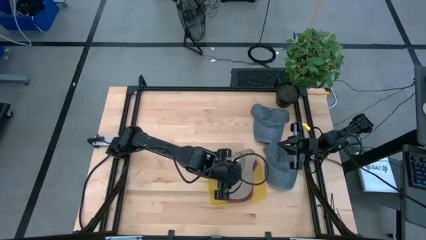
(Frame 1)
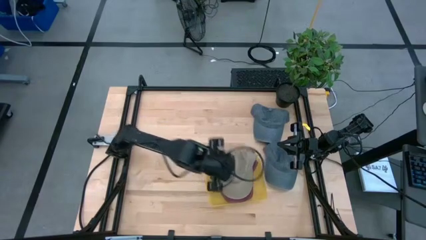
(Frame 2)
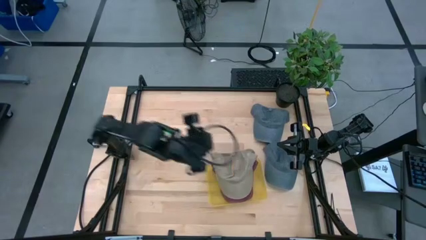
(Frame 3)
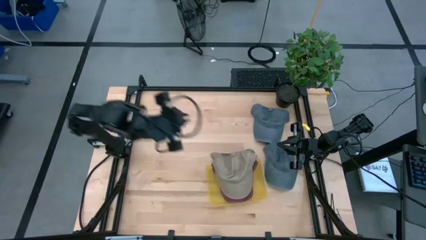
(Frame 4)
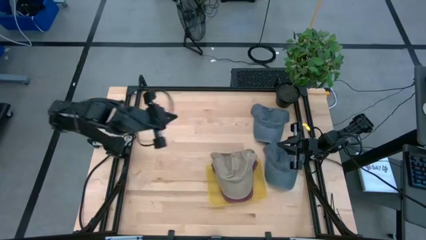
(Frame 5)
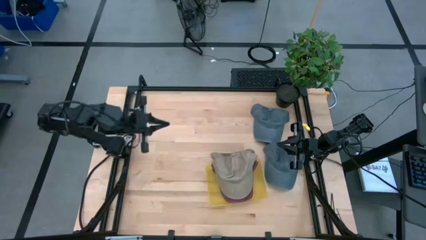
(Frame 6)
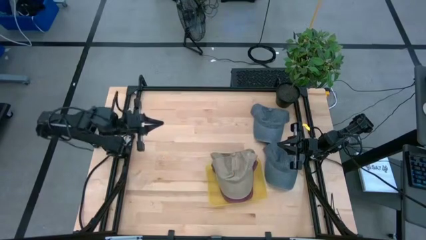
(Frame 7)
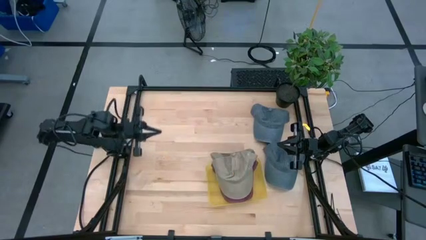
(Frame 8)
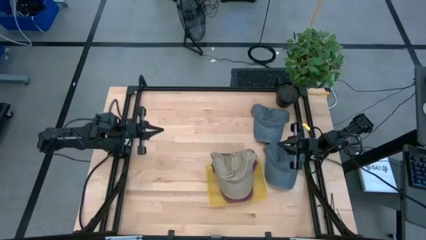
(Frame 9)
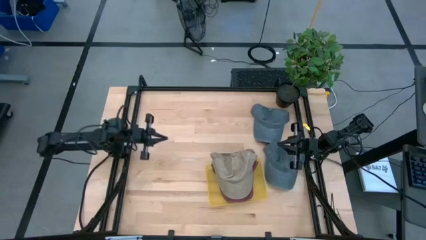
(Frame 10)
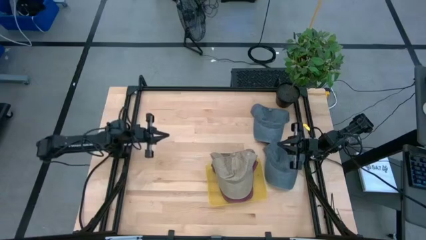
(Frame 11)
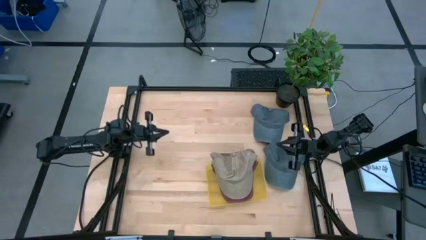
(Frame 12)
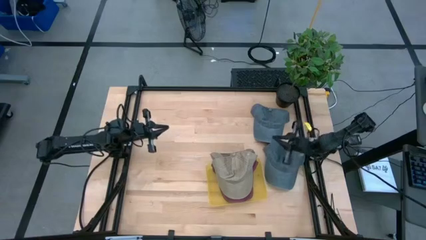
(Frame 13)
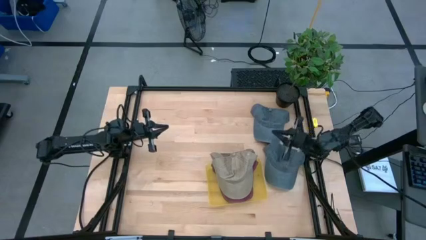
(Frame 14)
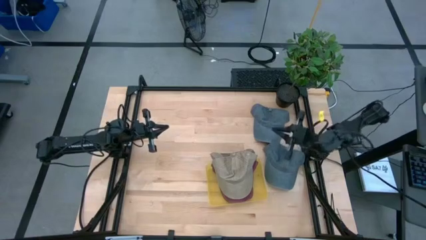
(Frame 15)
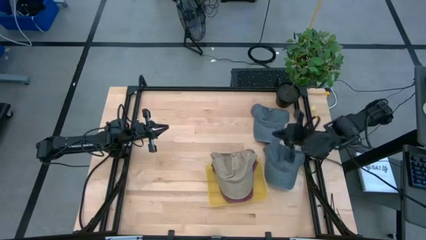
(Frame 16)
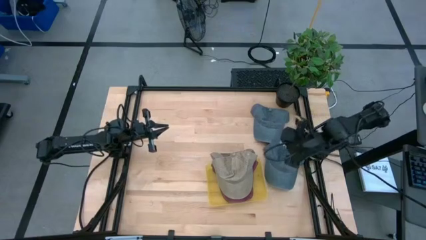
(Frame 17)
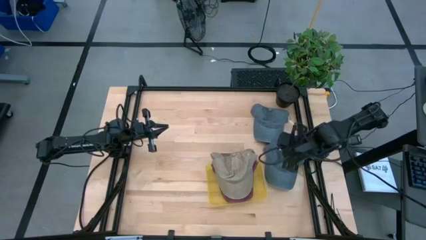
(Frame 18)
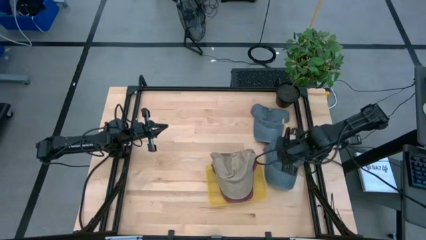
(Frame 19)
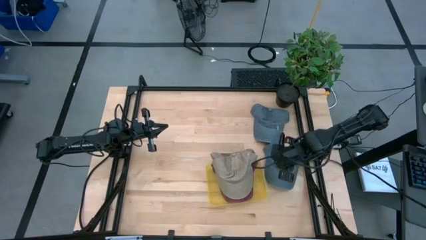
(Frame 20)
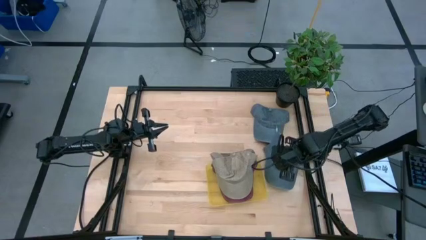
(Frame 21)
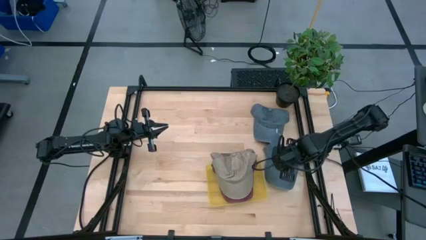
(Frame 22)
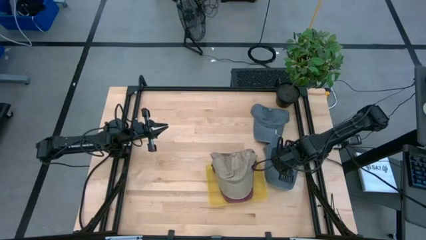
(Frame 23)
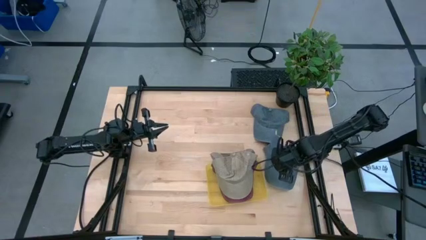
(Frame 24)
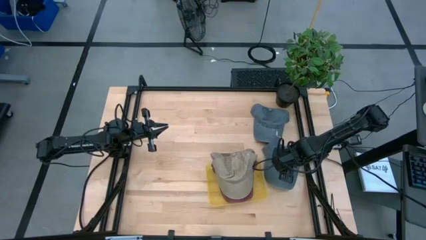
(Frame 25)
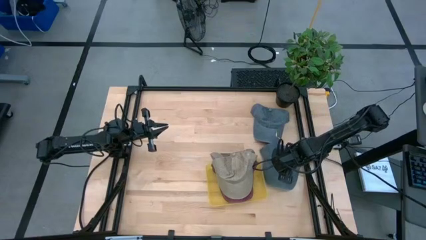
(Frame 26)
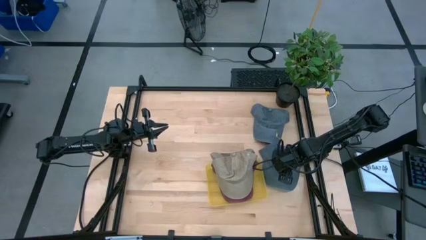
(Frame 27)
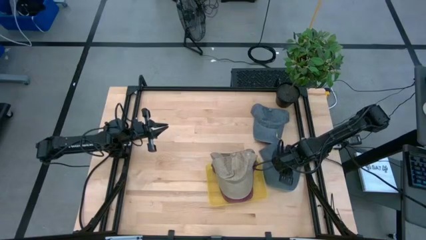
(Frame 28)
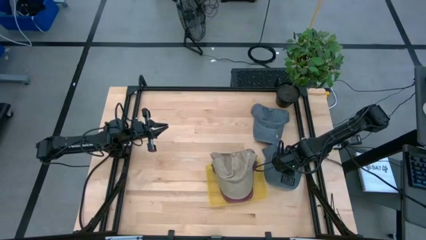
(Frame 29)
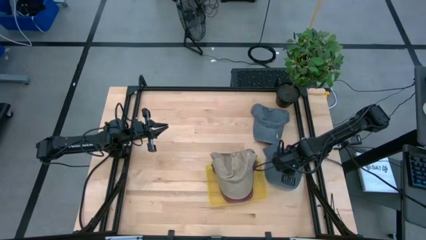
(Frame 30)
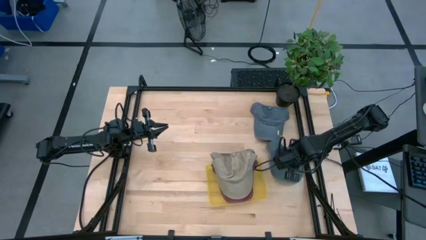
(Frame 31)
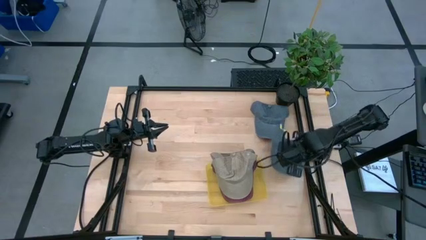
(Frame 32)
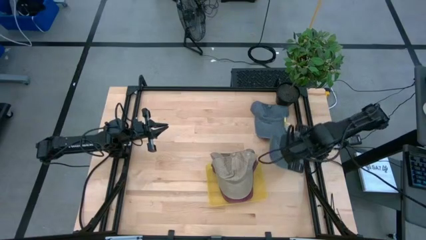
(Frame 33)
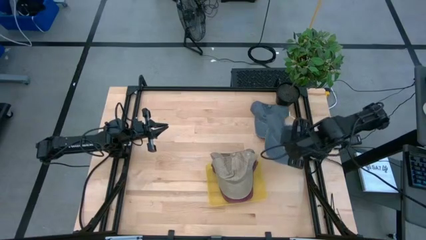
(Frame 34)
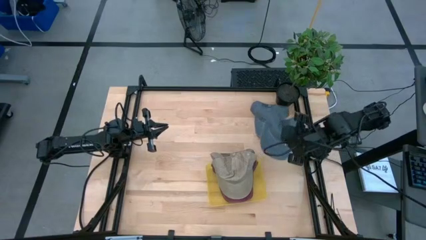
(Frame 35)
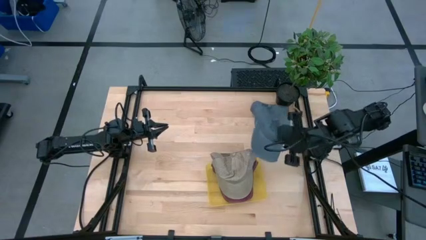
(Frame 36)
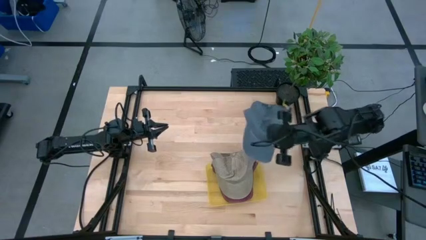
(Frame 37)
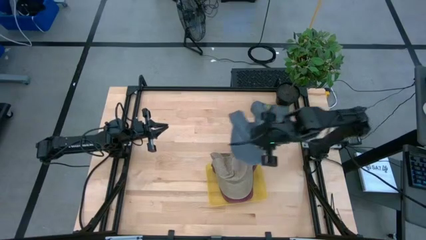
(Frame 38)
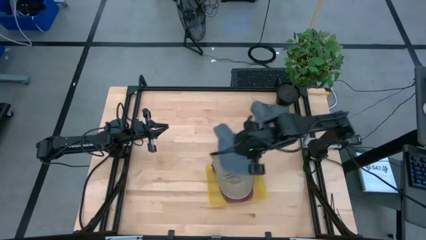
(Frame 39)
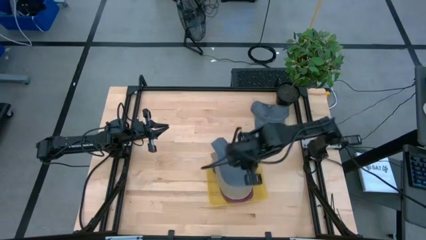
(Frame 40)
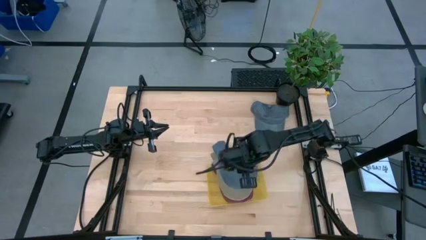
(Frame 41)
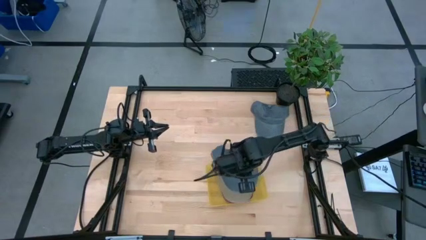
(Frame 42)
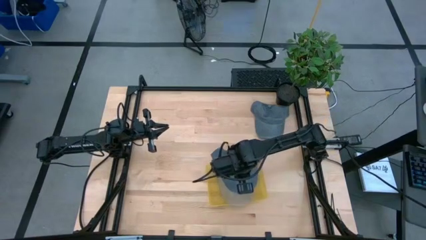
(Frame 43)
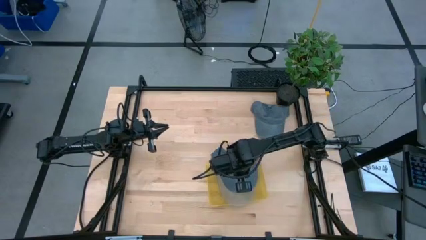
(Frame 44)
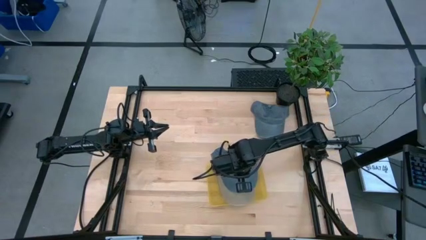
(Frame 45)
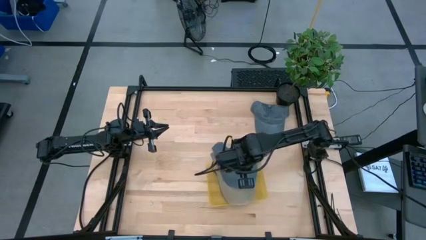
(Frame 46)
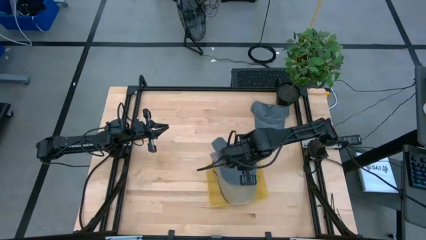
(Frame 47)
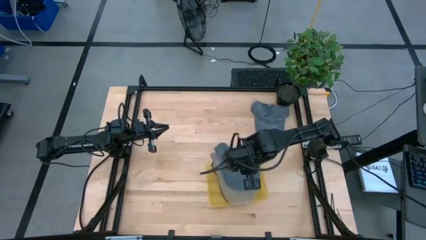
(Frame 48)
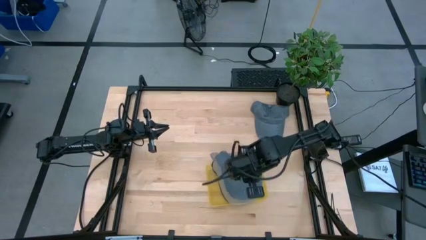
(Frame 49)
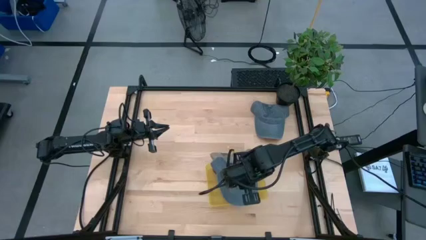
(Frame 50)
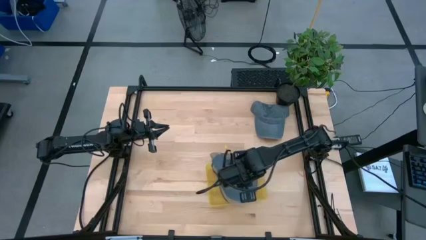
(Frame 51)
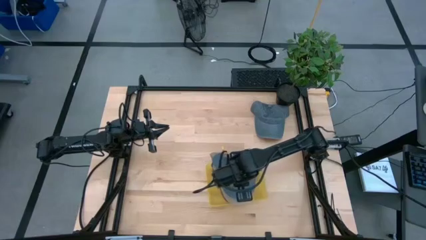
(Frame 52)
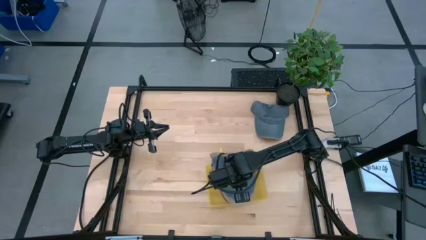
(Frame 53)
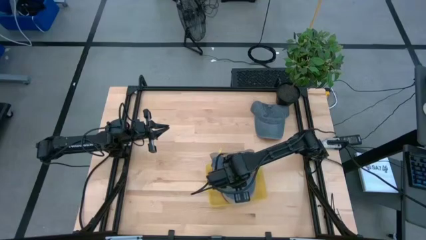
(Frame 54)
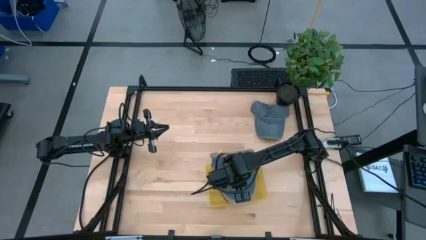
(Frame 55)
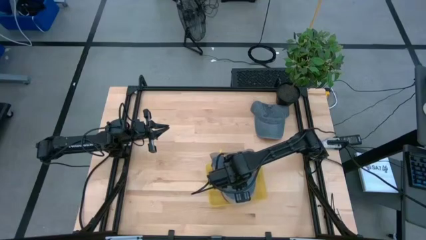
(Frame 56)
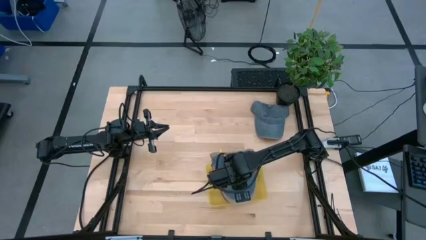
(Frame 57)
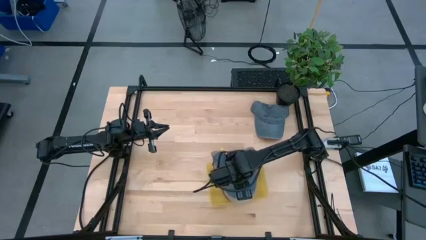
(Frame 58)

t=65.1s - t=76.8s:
Task: Pick and place caps into container
Put the bottom blue cap into the yellow container

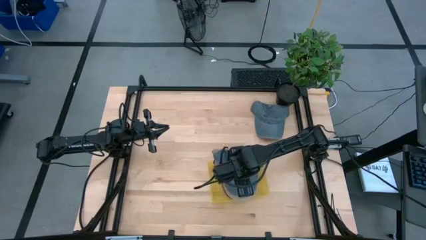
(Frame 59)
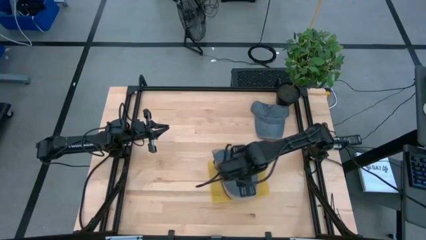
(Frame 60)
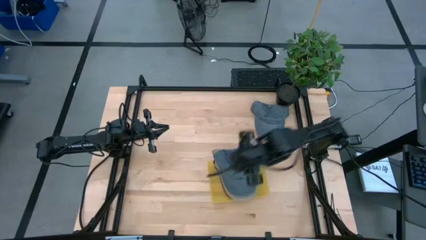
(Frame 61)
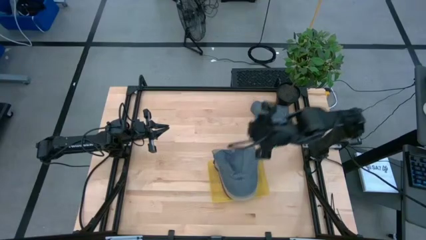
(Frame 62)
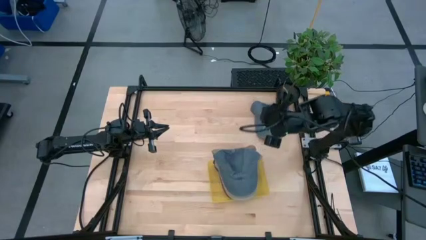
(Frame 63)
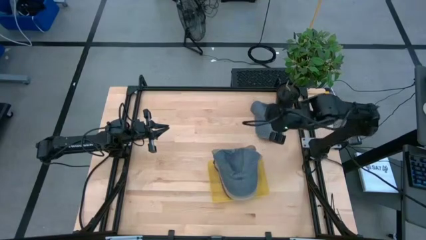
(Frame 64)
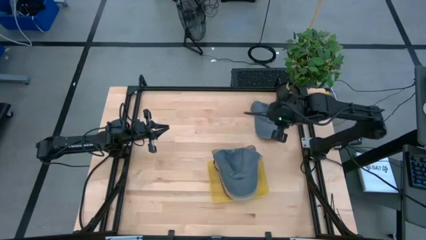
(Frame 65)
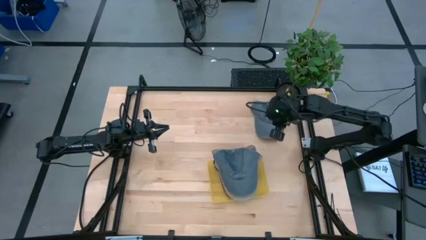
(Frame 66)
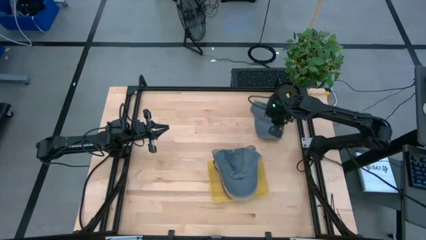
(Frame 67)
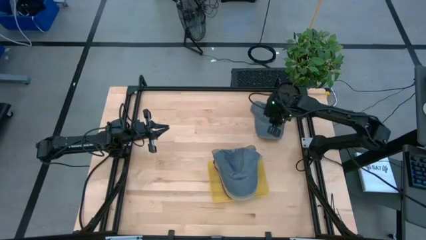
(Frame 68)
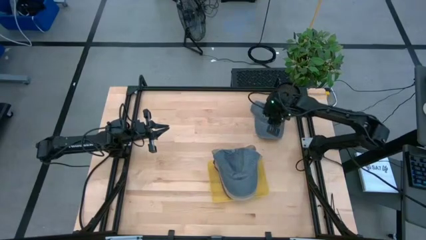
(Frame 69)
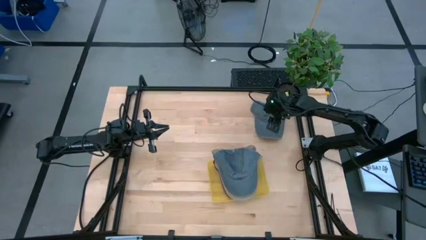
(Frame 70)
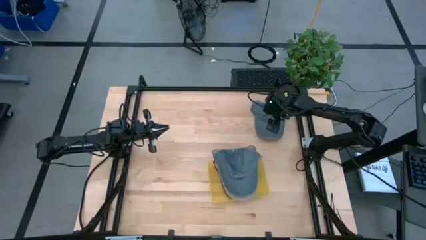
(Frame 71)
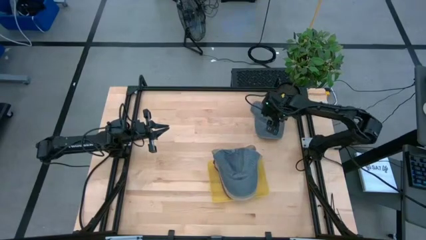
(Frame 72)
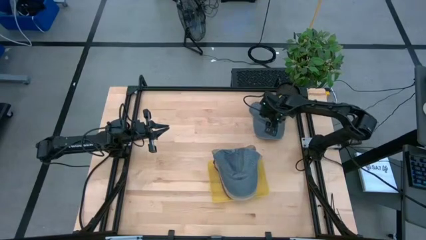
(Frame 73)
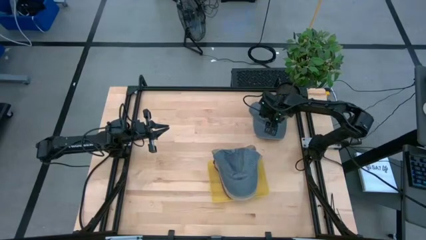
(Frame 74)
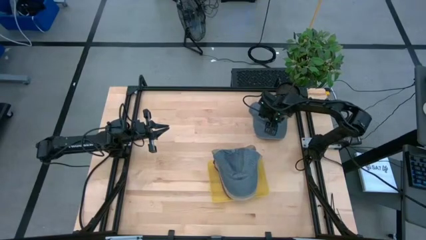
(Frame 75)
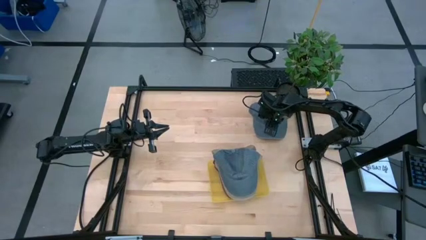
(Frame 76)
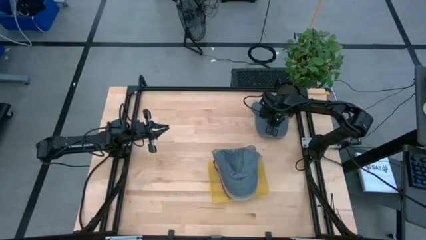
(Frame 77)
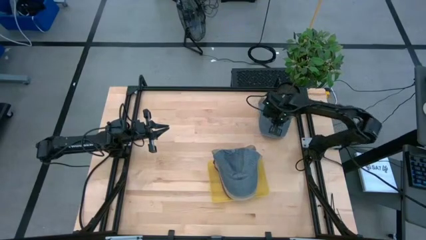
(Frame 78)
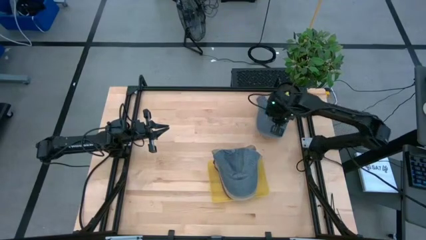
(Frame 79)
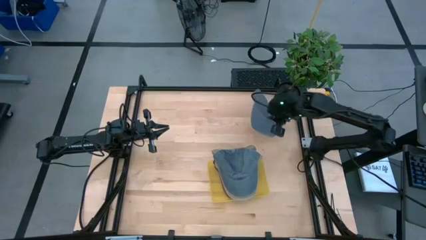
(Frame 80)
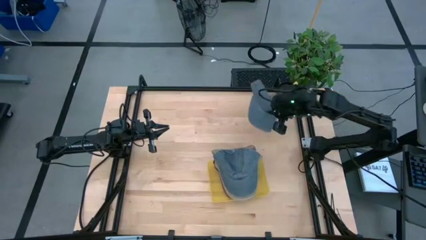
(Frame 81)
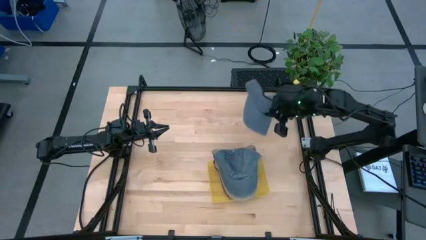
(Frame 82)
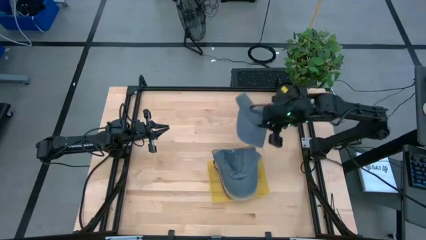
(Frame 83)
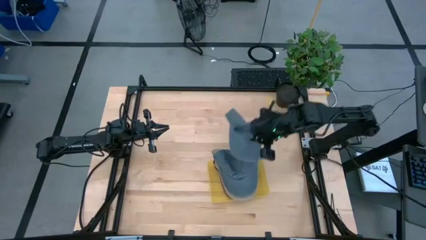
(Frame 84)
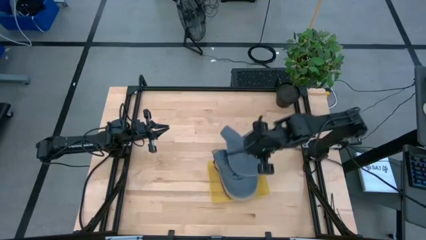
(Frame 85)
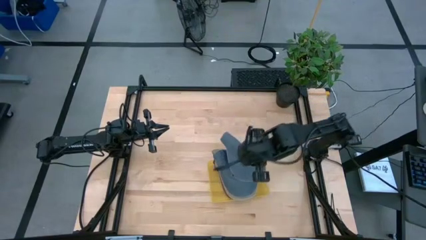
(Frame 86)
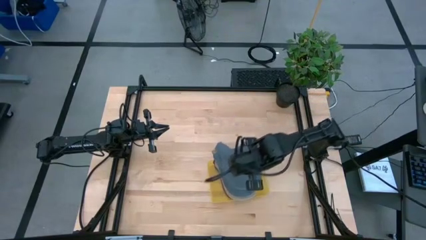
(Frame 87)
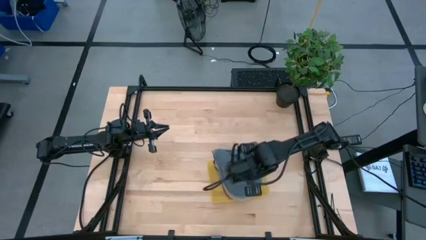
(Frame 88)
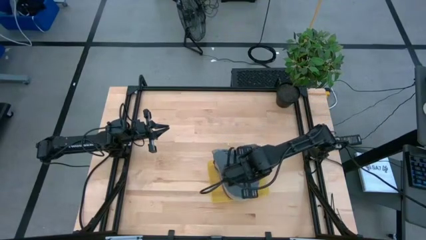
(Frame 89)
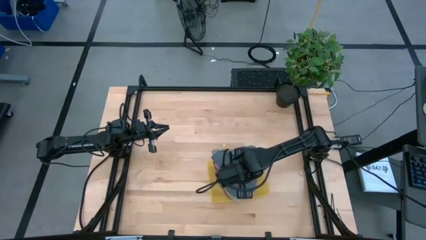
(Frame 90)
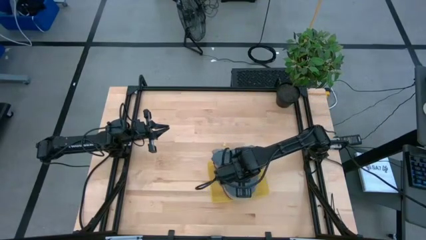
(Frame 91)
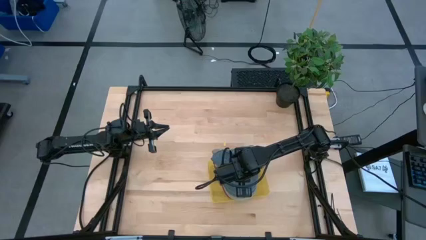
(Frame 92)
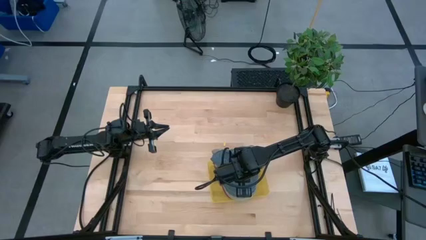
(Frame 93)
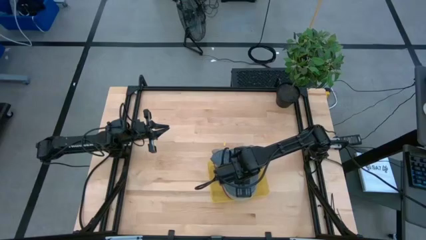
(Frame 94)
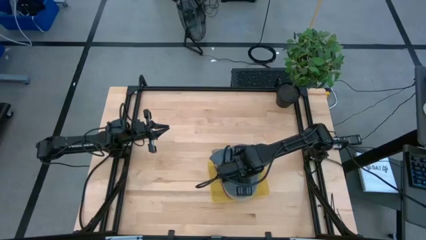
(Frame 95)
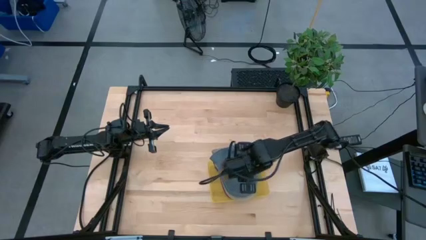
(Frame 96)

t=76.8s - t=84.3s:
Put the blue cap into the yellow container
